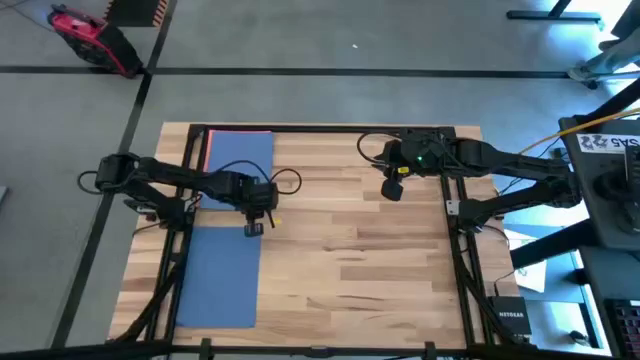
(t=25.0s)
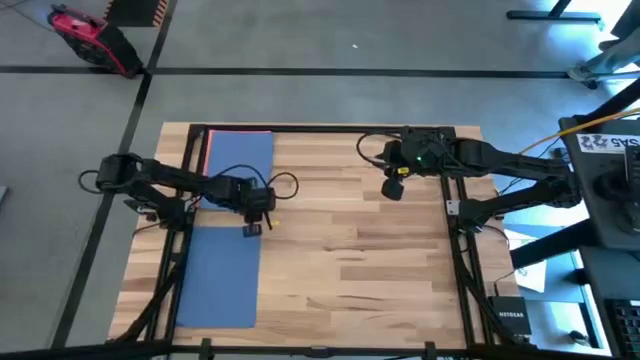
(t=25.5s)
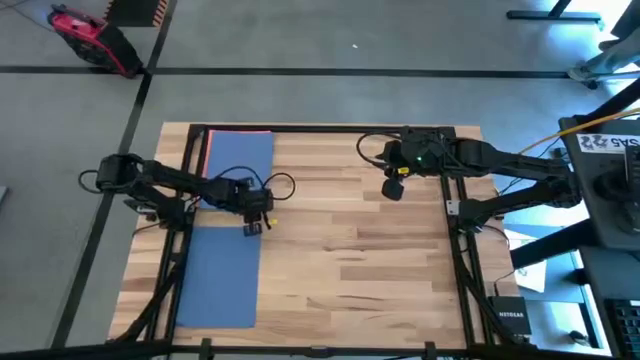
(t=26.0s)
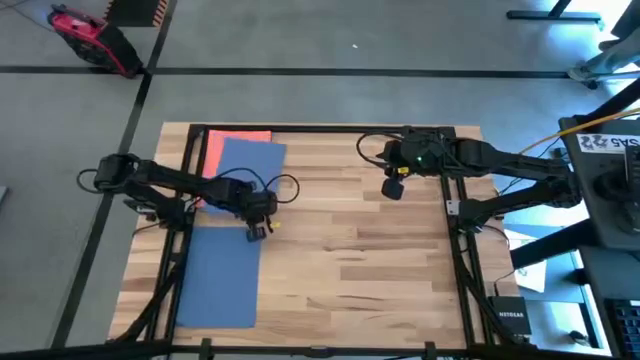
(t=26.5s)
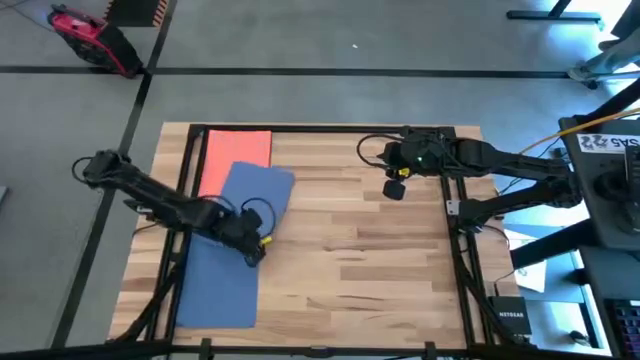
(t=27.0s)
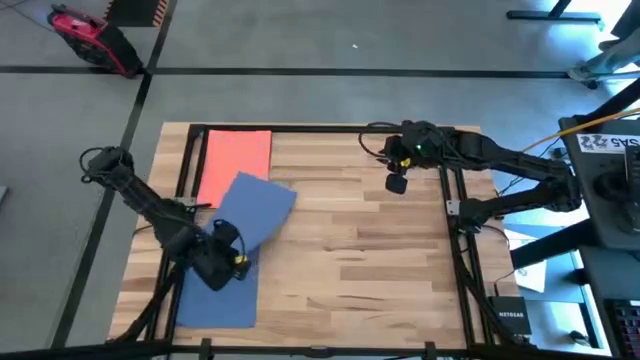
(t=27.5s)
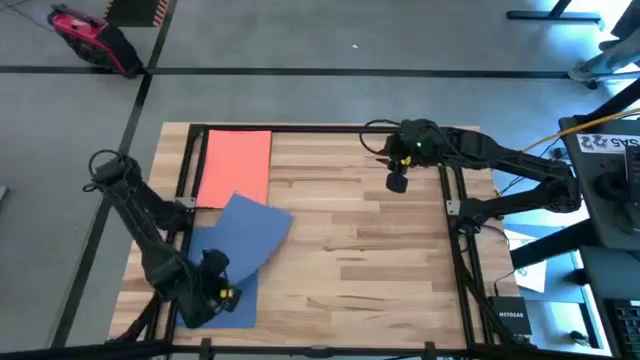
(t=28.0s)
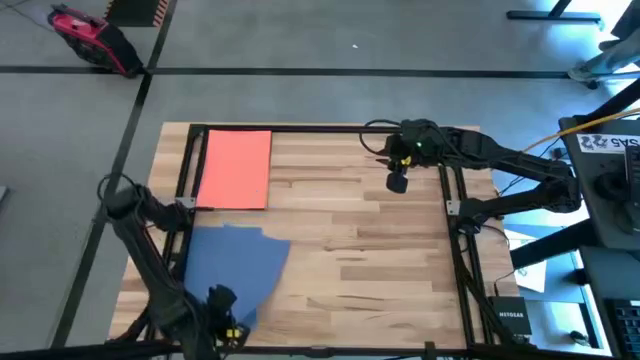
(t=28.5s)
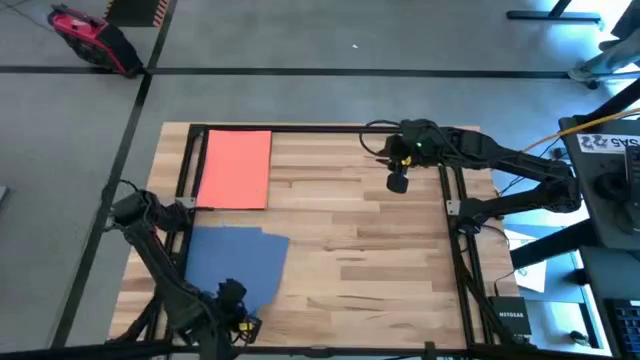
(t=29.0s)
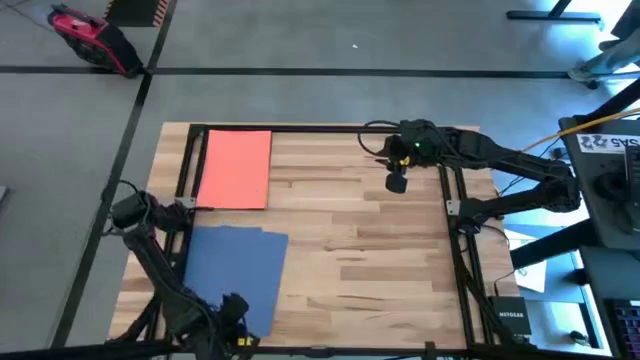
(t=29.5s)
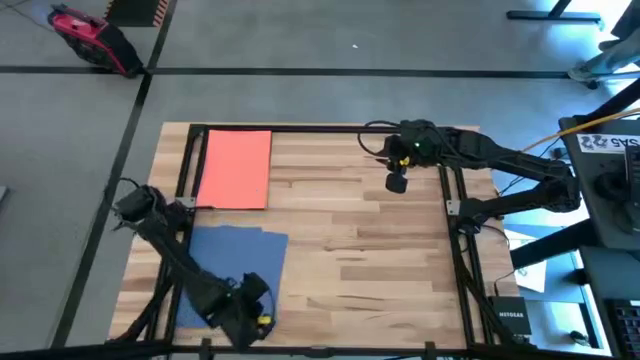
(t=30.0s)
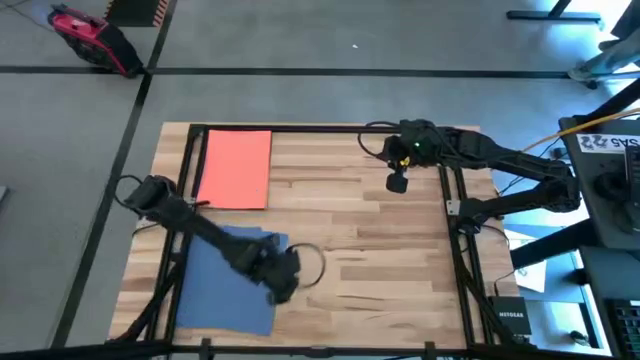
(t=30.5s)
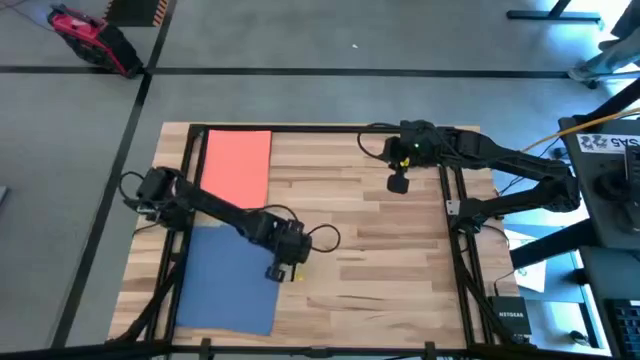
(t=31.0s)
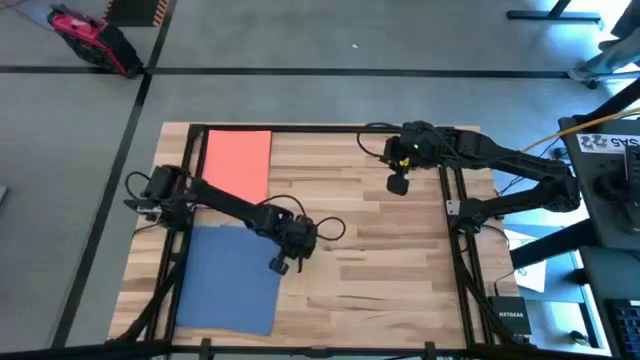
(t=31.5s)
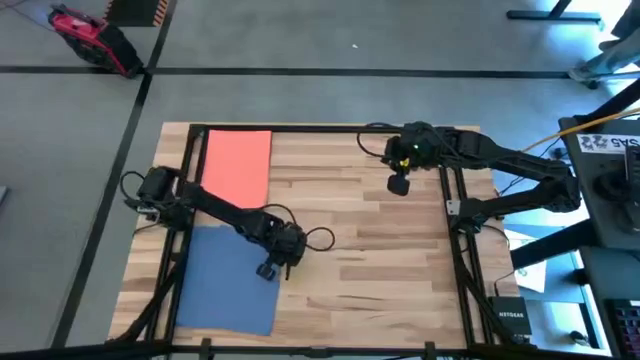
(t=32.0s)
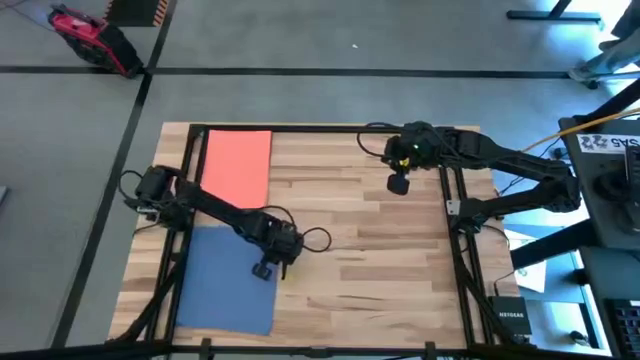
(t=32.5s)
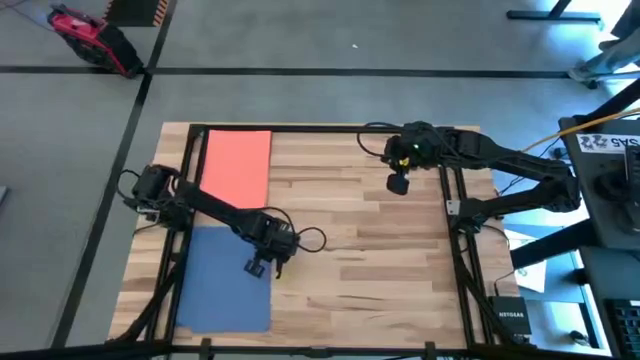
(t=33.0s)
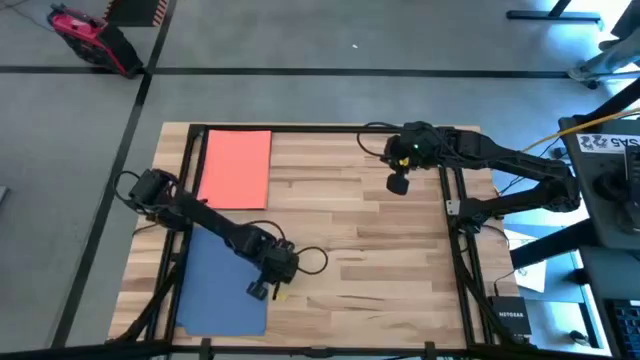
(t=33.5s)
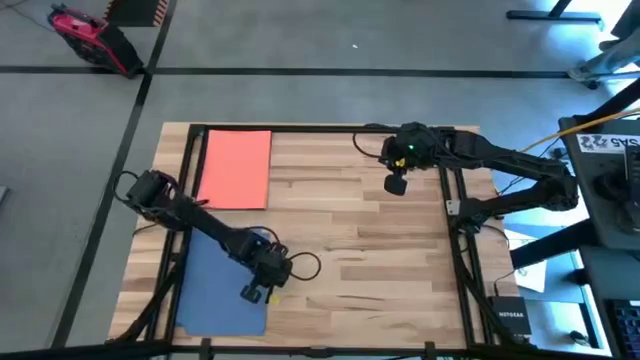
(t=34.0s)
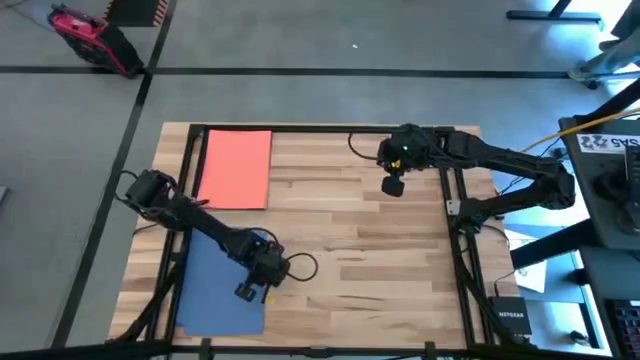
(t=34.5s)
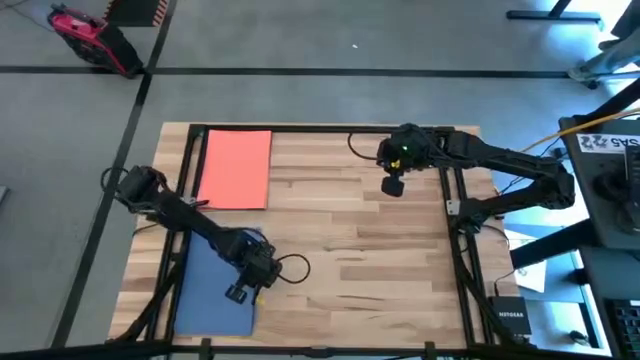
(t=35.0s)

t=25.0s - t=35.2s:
Task: Organize paper
Stack the blue colored paper on top of the blue colored paper

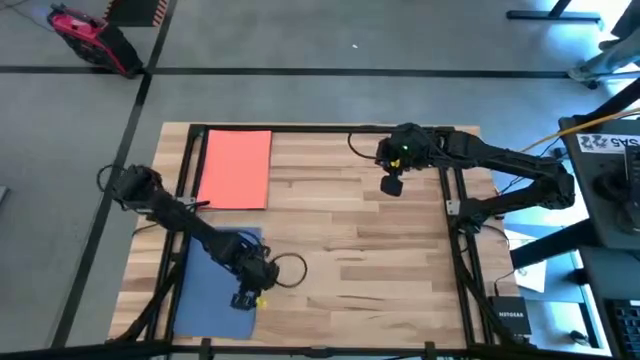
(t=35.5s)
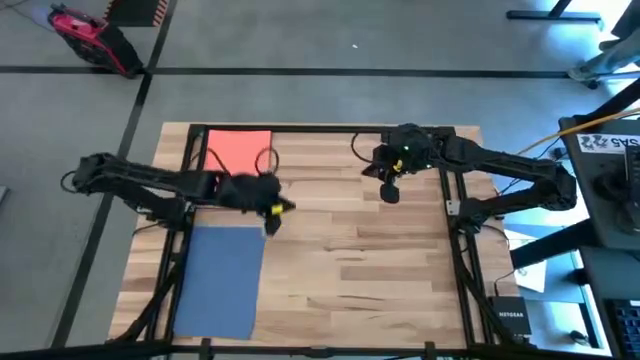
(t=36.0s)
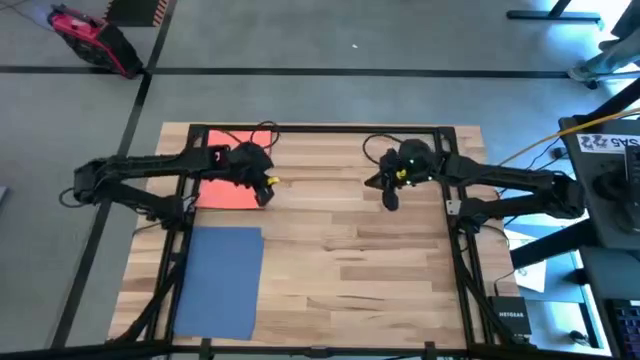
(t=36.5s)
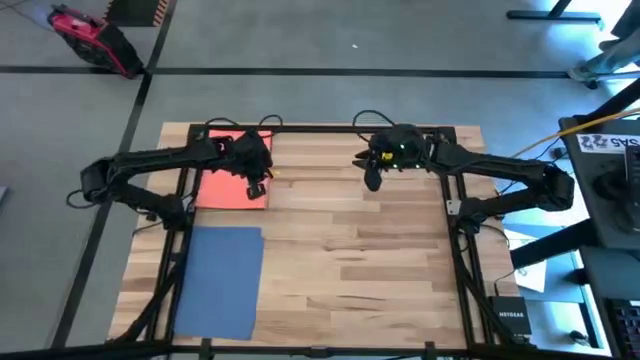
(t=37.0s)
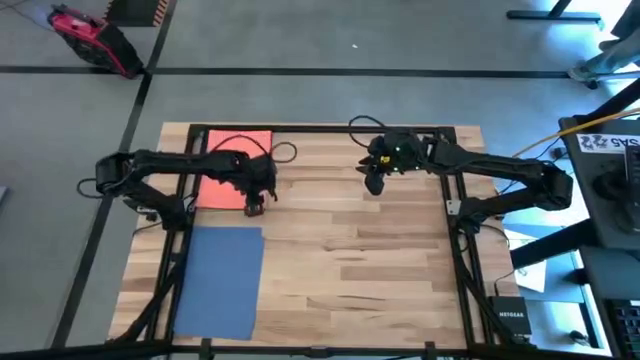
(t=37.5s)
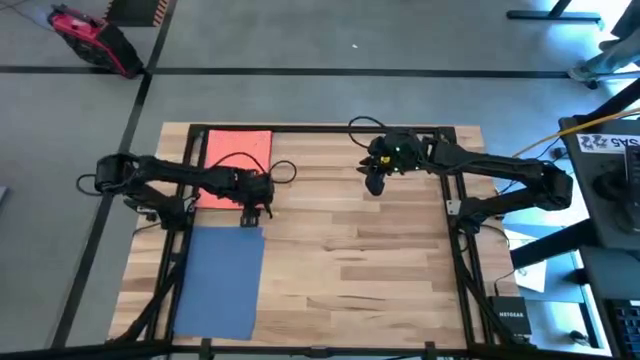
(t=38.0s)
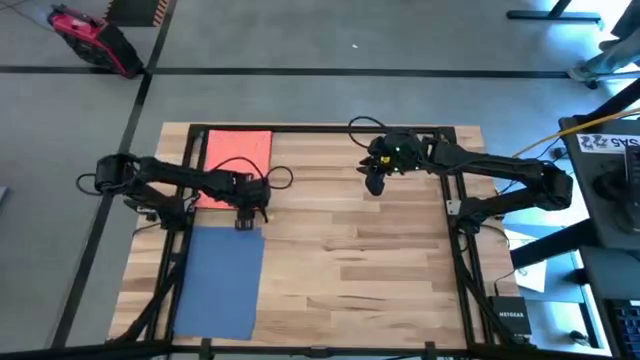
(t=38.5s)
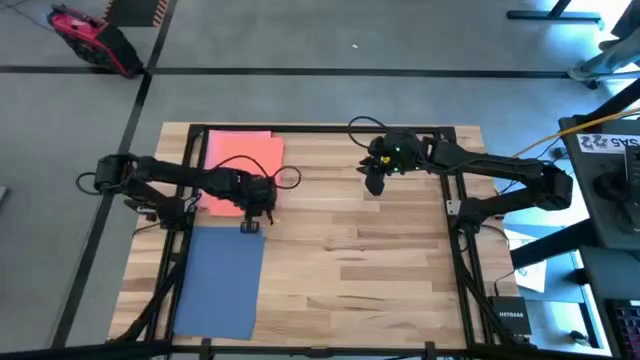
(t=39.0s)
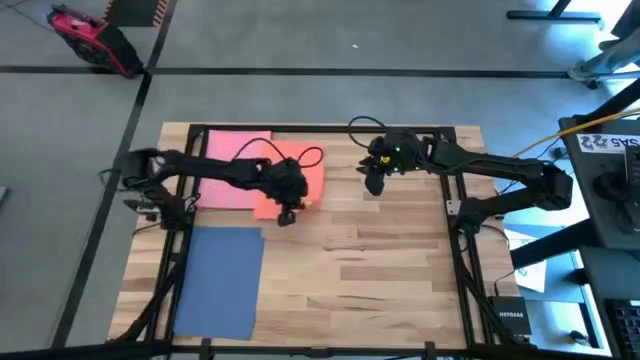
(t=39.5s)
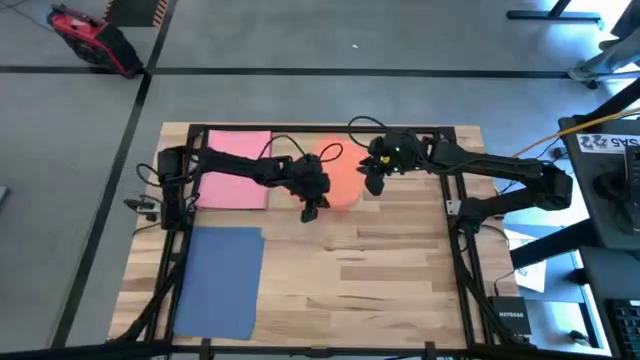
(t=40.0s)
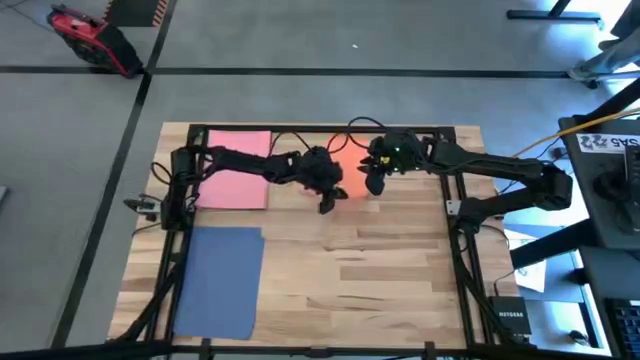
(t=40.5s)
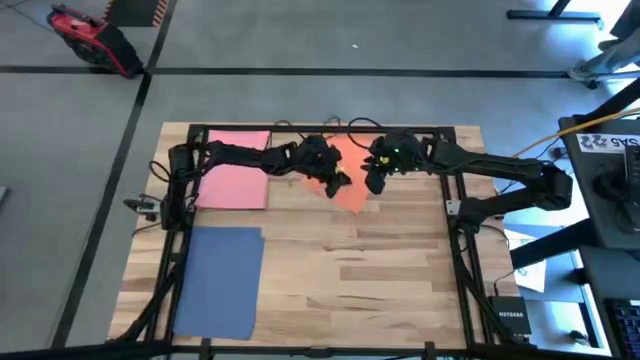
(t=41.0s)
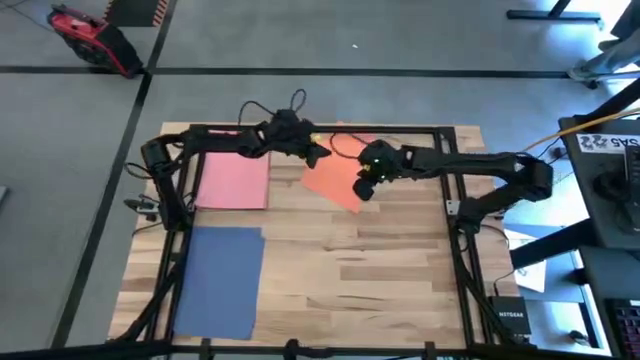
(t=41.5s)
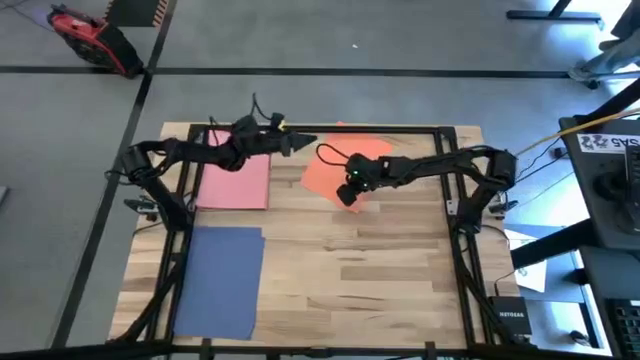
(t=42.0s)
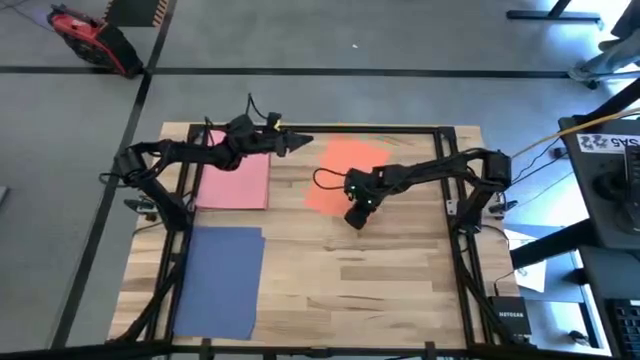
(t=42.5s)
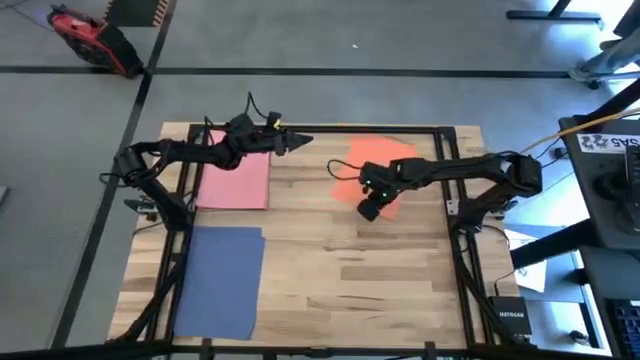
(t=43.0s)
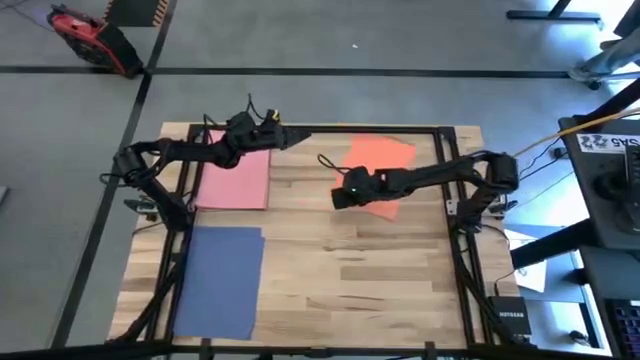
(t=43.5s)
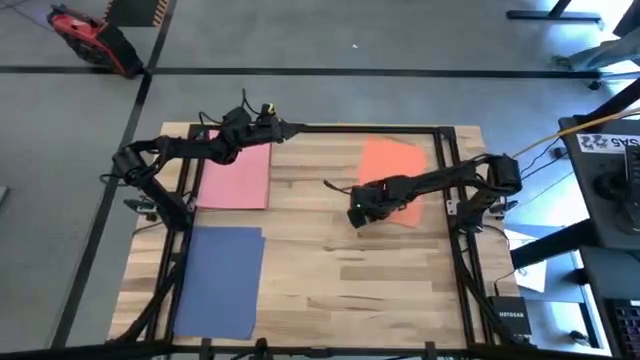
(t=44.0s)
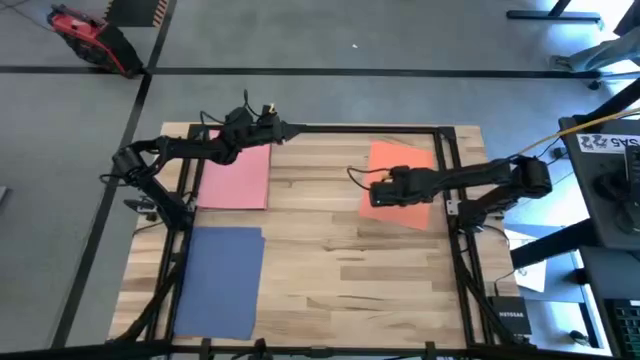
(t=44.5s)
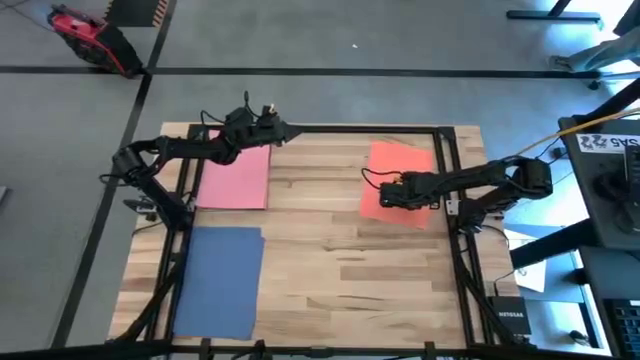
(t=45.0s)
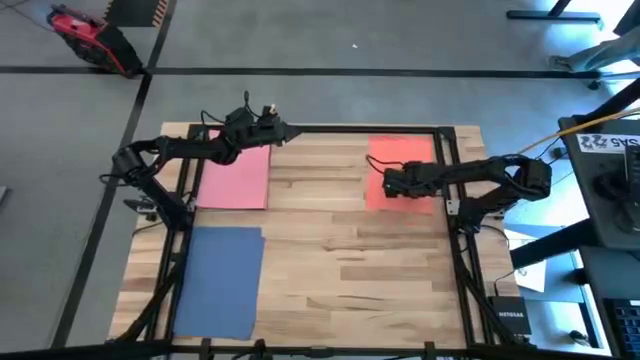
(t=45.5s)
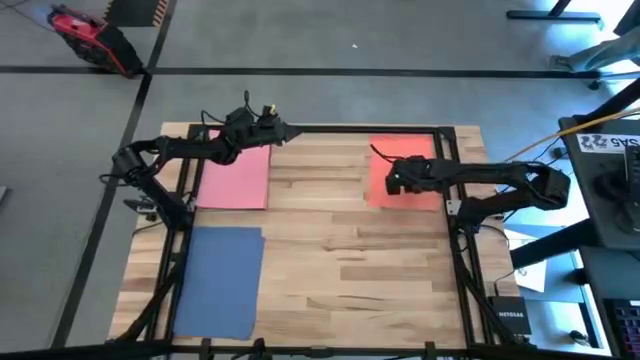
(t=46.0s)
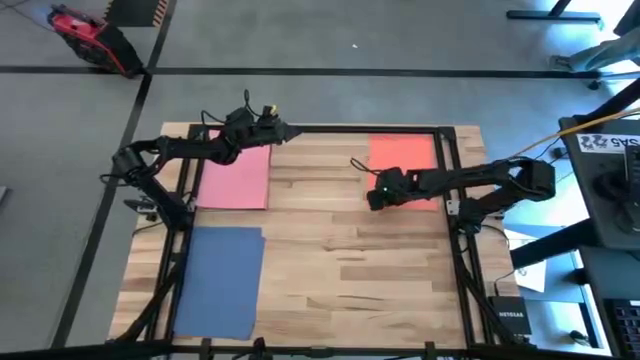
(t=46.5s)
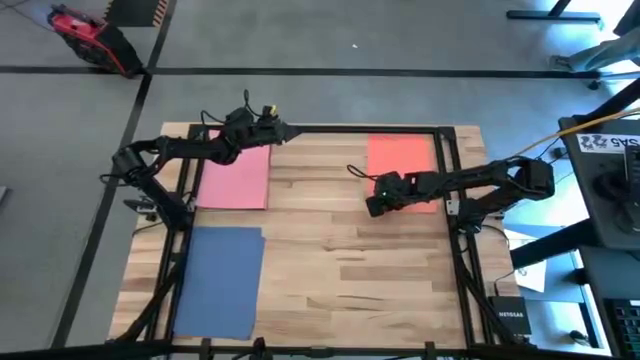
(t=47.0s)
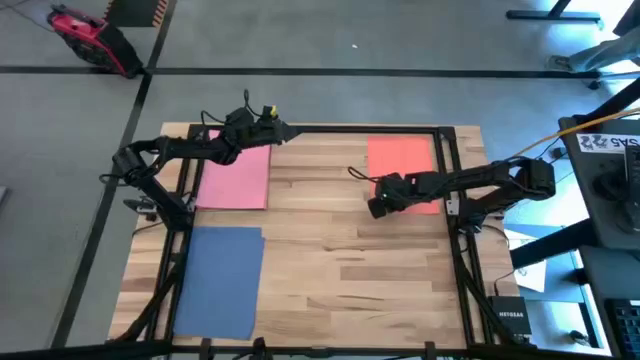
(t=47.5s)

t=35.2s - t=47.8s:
Move the orange colored paper on the top right of the table
